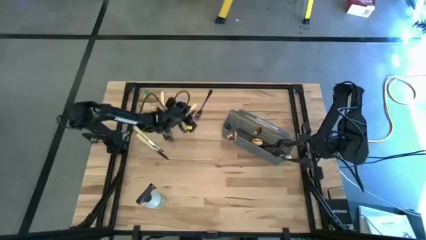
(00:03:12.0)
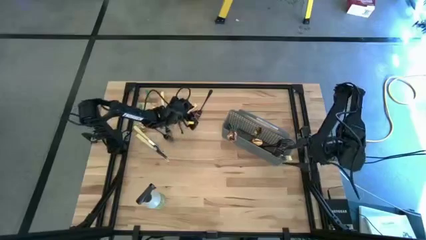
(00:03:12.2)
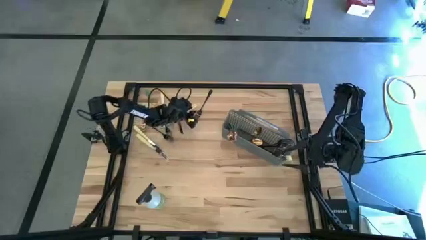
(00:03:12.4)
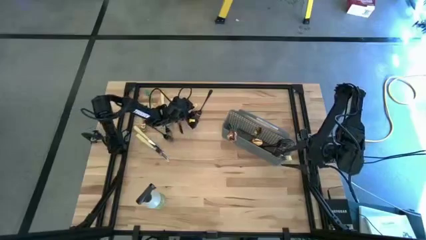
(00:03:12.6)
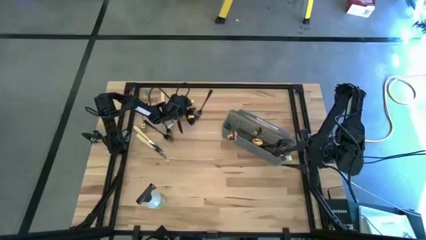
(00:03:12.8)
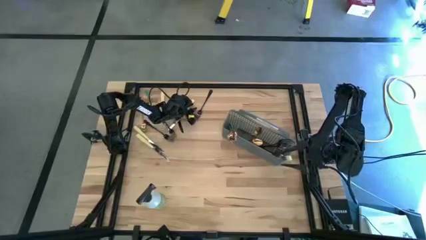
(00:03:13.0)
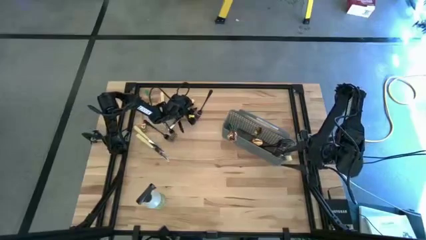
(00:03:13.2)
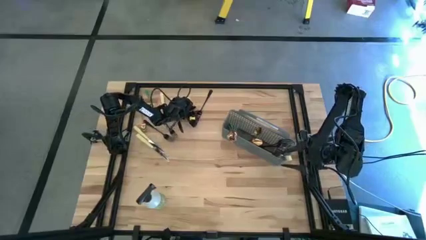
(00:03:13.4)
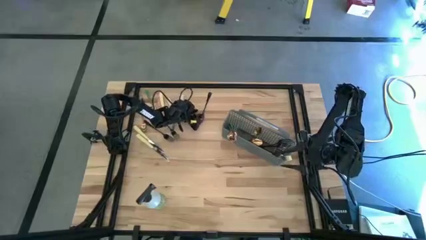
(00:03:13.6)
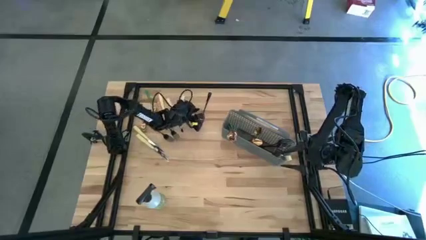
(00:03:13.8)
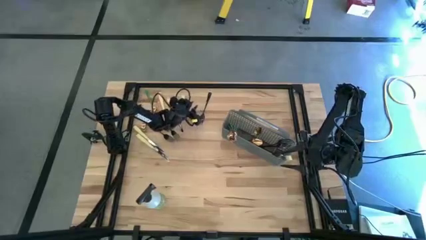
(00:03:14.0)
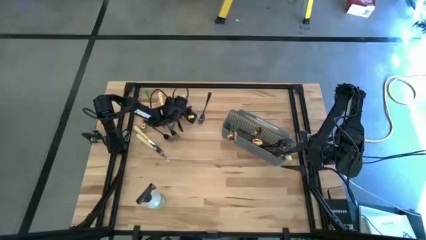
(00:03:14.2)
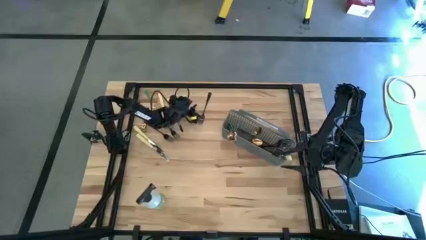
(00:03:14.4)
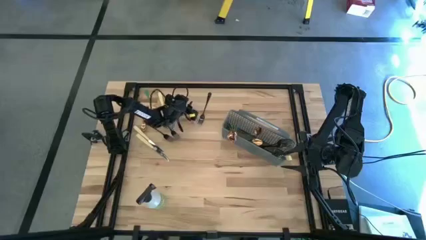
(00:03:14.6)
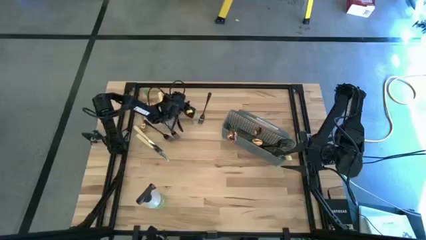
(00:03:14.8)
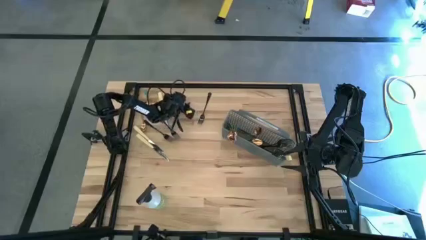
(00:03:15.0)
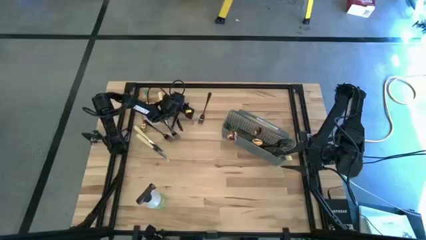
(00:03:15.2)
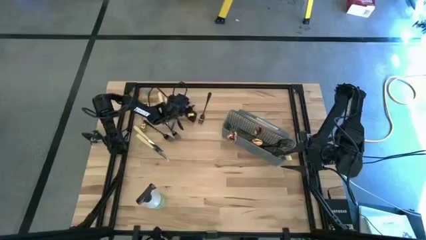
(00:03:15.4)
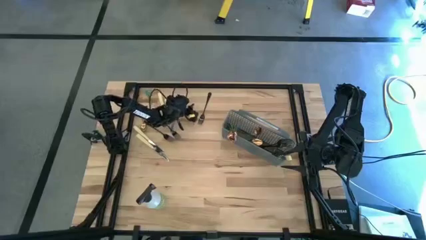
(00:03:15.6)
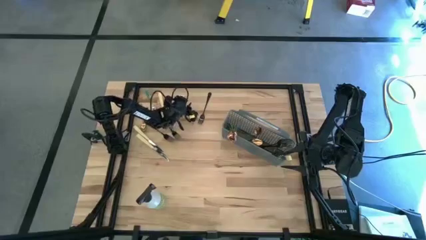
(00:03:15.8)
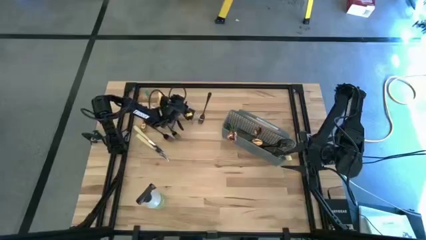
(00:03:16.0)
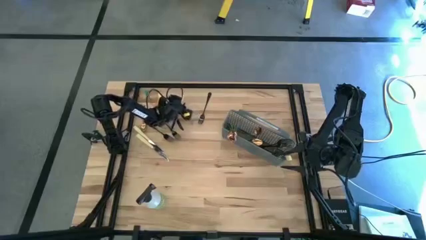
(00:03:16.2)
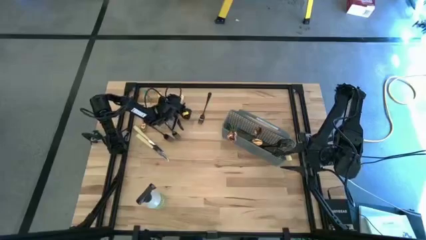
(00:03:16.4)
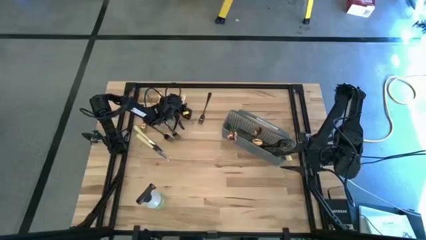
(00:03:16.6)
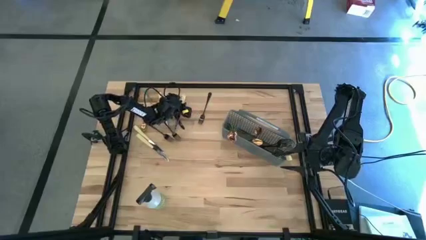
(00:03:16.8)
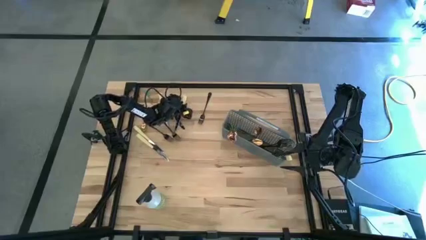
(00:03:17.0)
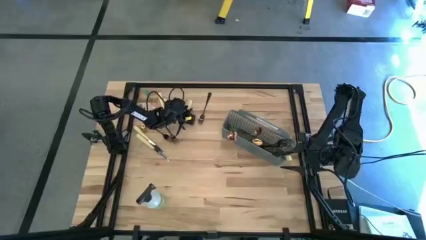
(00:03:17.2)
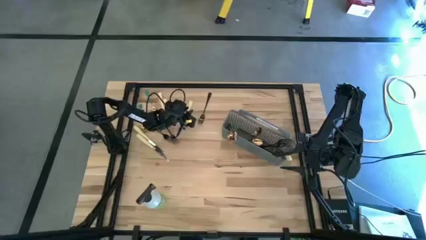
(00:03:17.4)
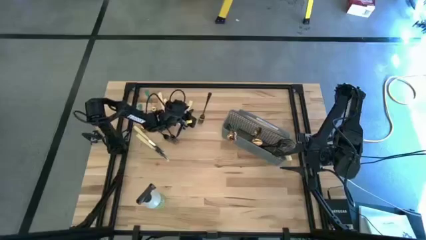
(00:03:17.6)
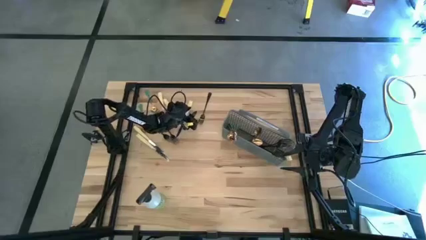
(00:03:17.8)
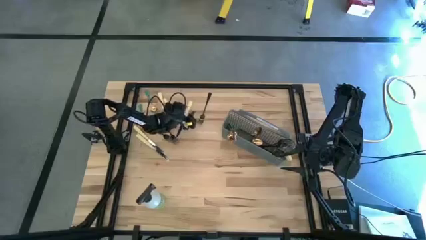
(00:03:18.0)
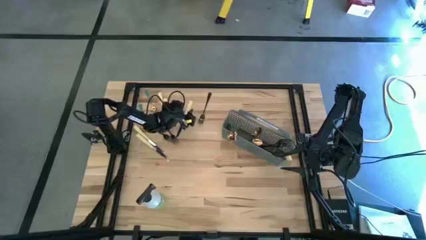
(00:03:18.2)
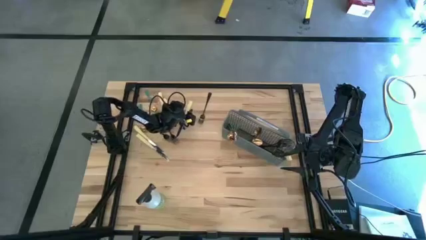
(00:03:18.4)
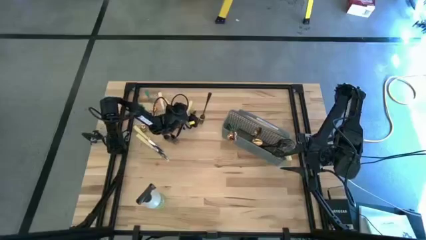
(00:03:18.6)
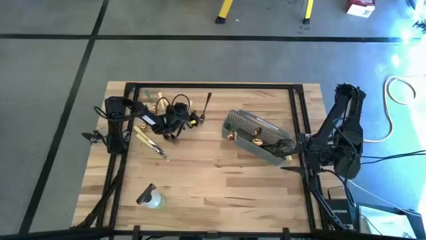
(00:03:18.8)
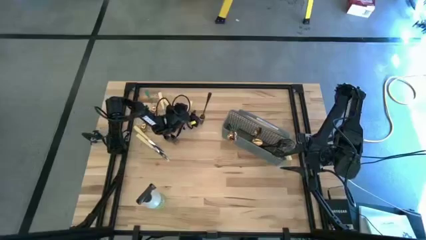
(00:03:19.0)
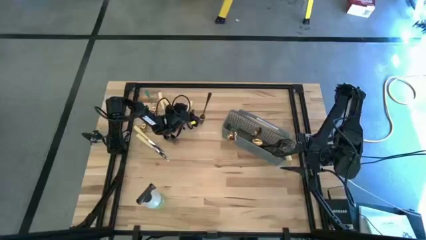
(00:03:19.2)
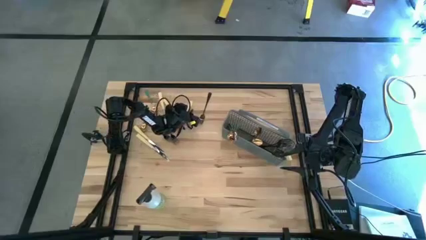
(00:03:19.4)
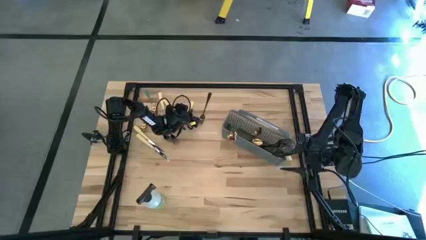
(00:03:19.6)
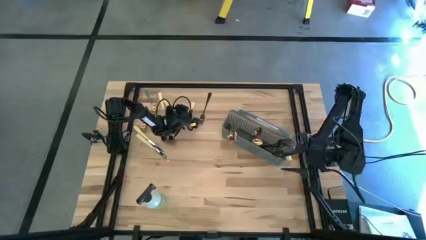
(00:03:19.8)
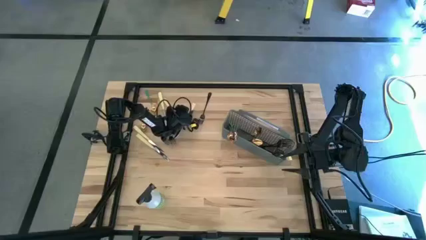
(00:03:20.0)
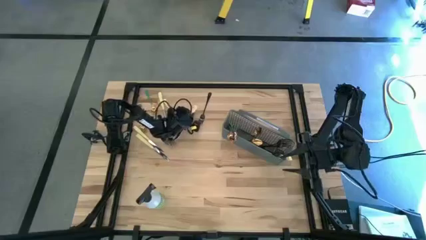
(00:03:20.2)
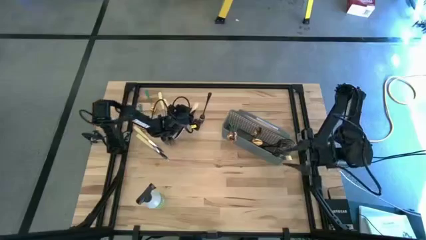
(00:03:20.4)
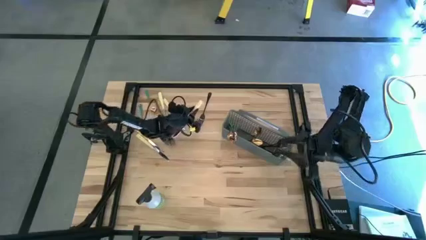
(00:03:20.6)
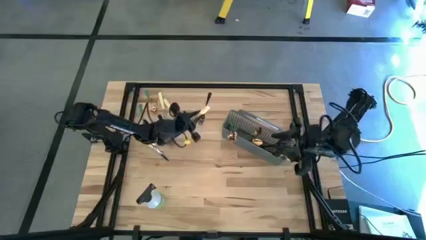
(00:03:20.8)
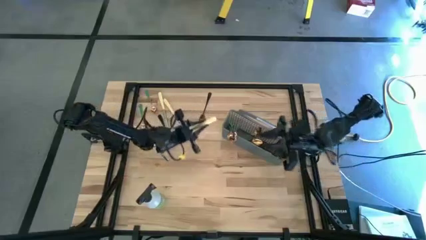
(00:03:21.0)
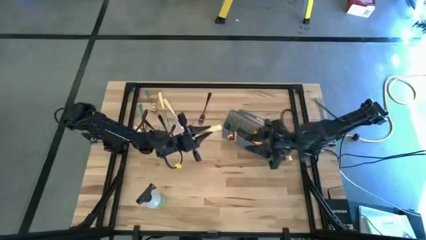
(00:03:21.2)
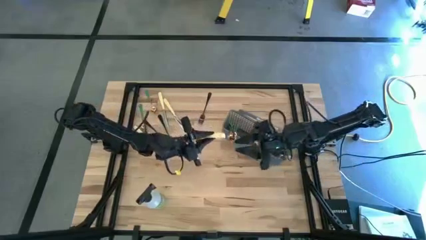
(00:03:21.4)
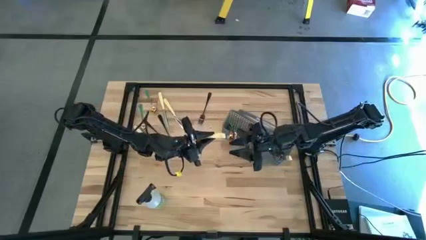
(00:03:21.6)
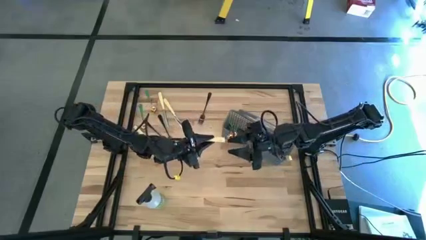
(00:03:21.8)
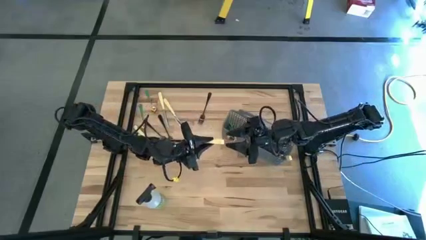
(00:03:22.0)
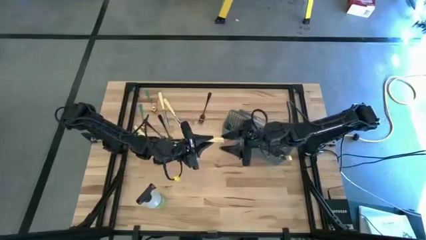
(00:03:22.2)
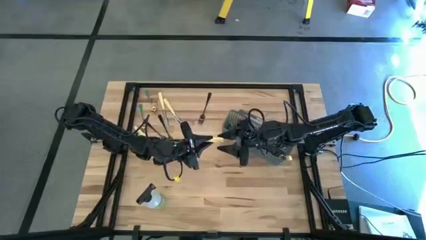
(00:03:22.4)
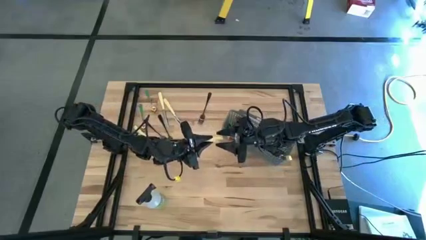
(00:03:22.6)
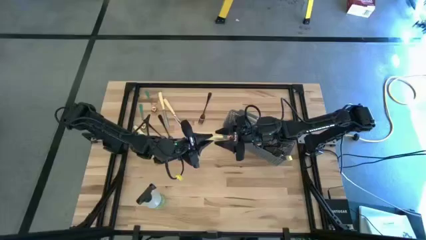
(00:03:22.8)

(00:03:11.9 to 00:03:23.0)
Task: Sort silverware
Put the silver knife into the cutlery rack

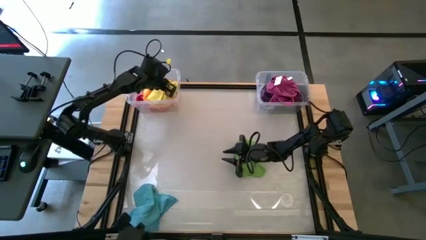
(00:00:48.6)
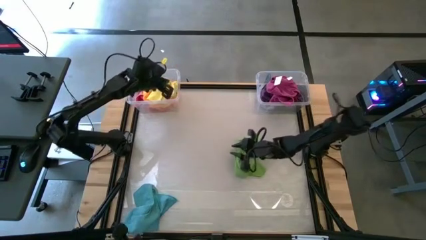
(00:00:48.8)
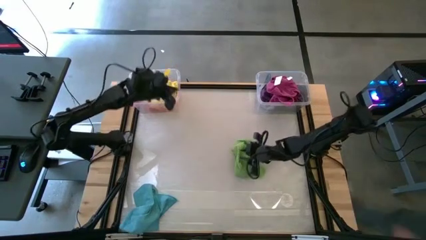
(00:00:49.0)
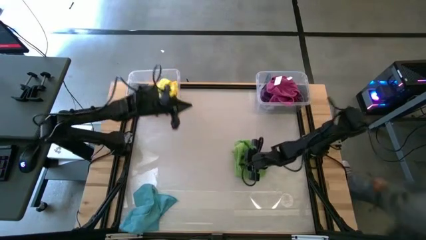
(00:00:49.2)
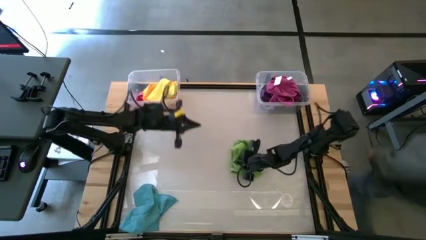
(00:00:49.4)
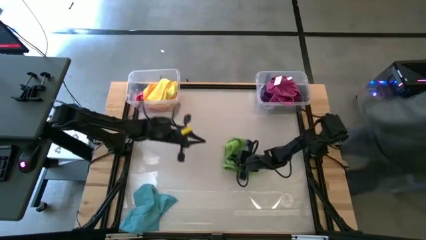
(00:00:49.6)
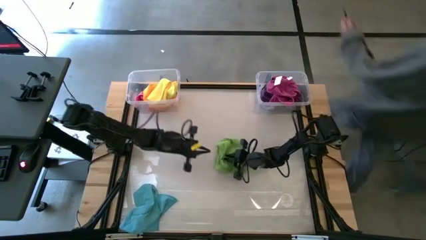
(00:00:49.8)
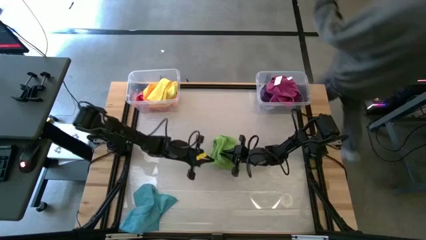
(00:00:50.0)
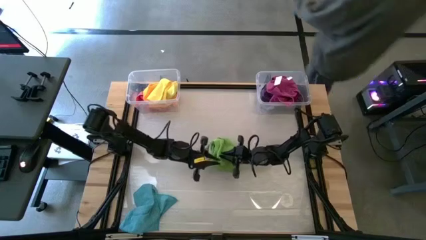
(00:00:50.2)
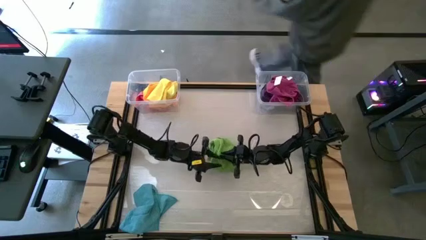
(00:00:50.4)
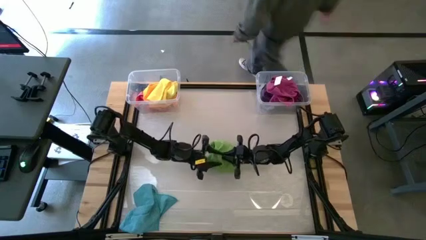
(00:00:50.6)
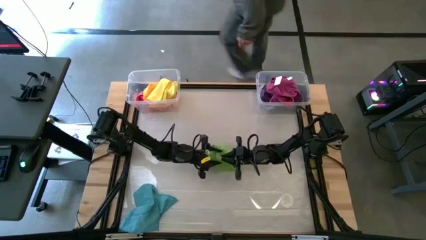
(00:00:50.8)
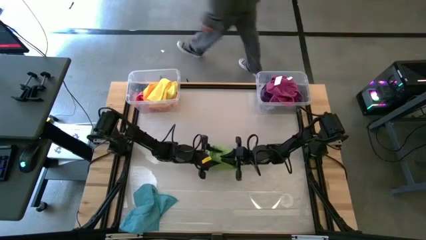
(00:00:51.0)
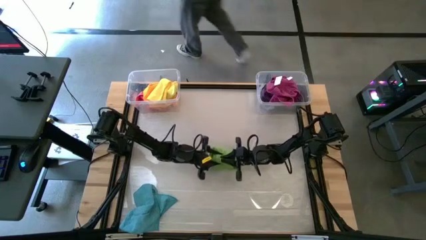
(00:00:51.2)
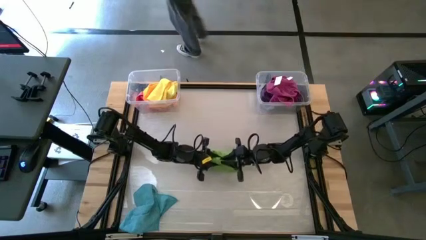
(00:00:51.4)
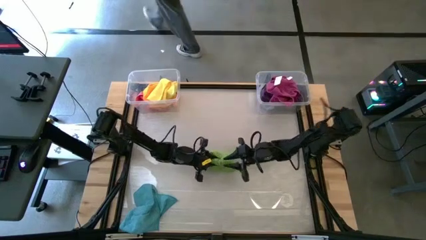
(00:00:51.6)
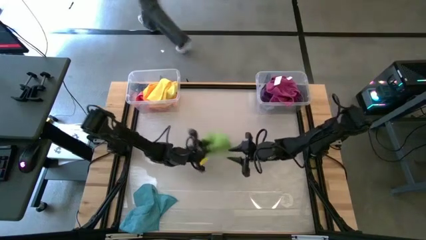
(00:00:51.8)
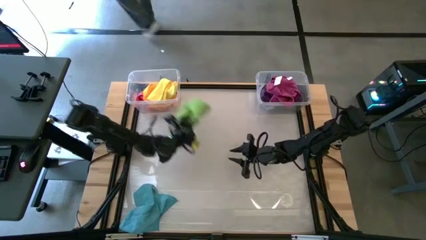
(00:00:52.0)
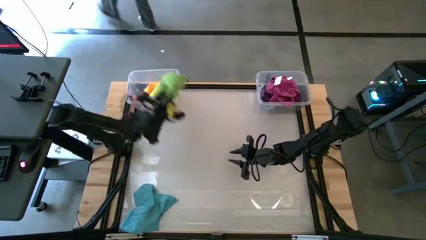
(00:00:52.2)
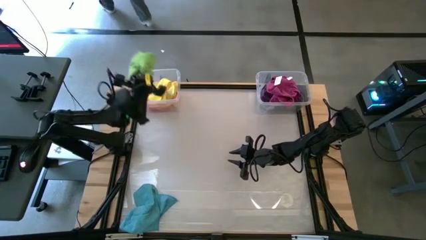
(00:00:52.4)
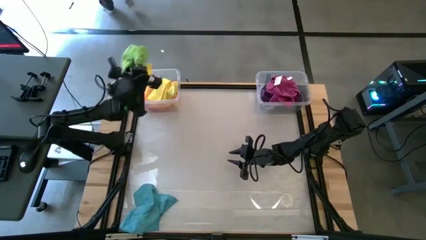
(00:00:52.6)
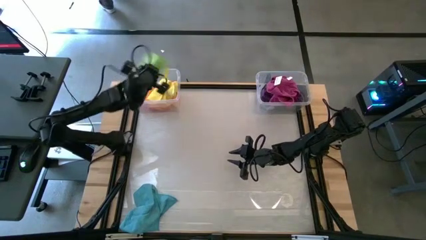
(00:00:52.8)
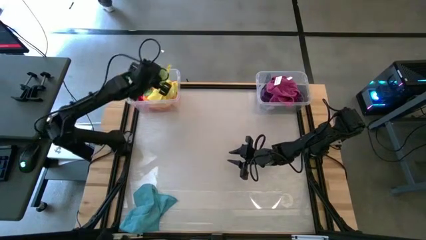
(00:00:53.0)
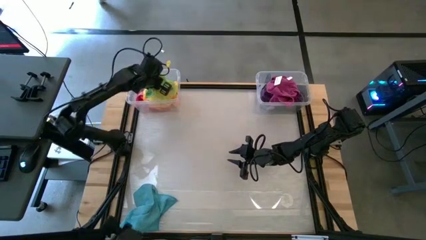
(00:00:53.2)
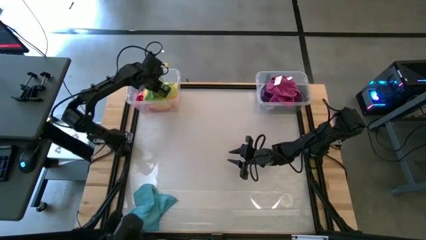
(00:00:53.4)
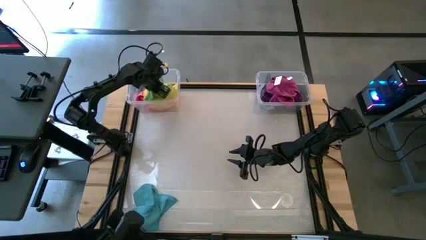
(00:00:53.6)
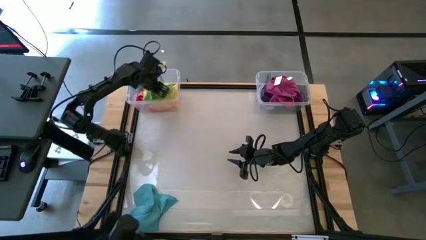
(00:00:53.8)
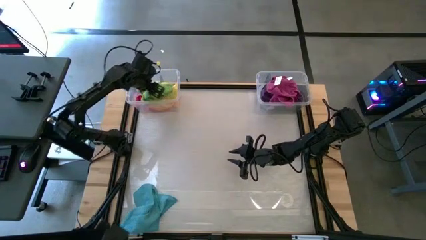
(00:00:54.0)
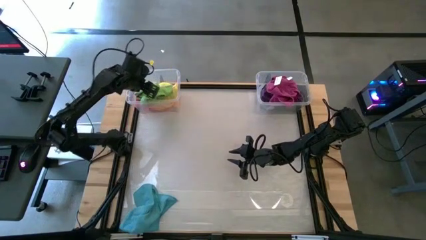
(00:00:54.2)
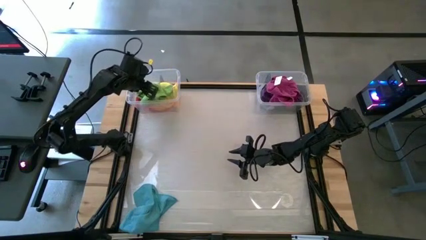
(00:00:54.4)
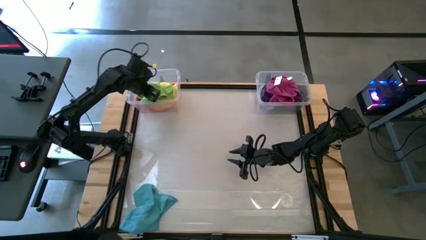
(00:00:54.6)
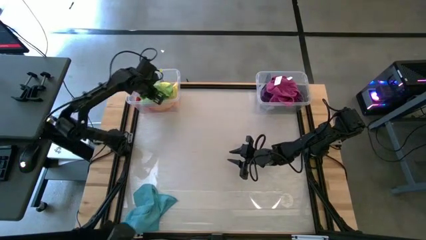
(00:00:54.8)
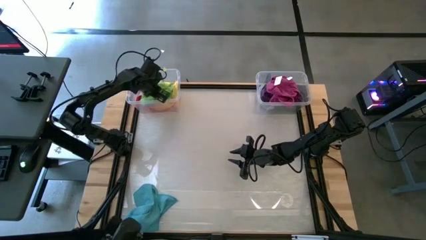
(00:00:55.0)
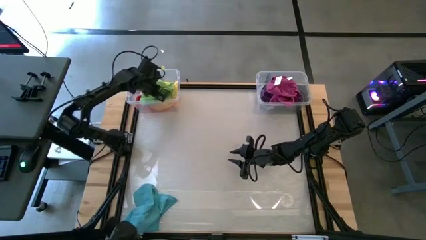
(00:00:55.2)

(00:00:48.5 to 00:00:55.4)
Task: Sort towels by color in basket
Put the green microfiber towel into the left transparent bin
